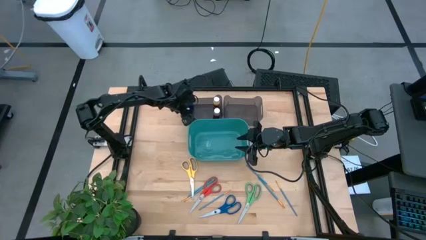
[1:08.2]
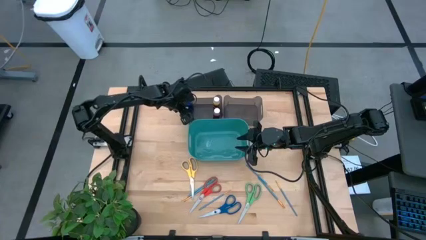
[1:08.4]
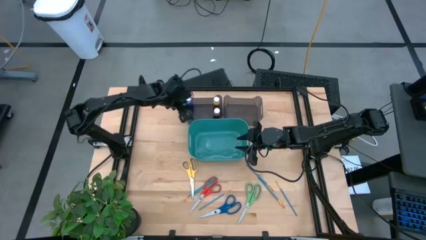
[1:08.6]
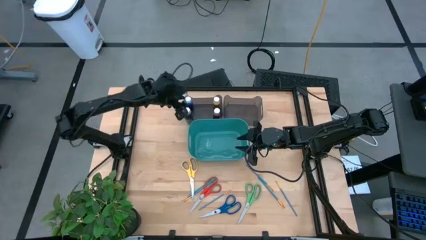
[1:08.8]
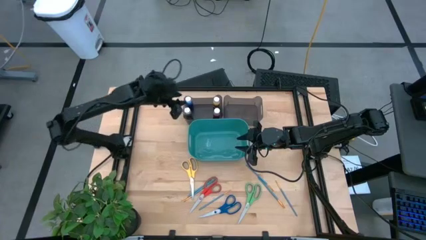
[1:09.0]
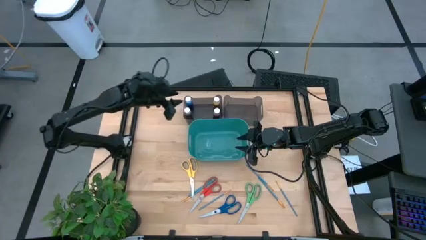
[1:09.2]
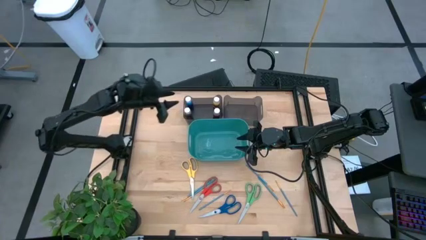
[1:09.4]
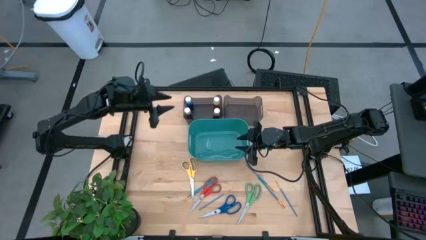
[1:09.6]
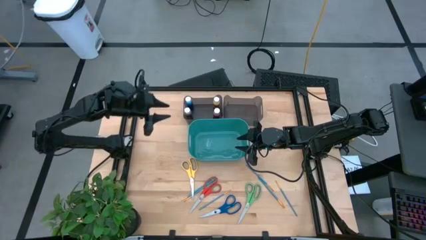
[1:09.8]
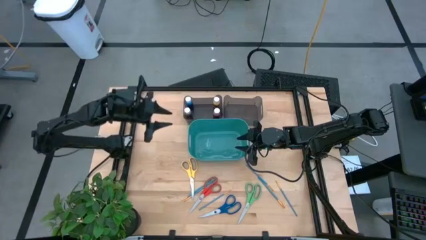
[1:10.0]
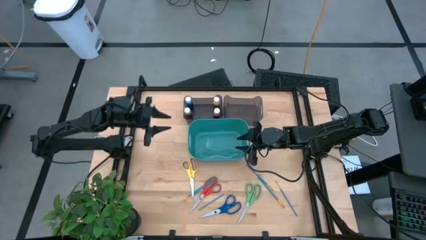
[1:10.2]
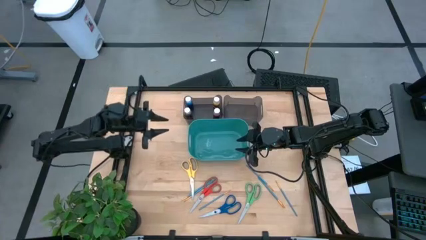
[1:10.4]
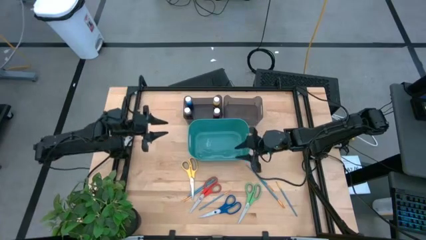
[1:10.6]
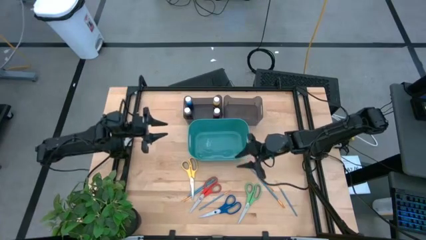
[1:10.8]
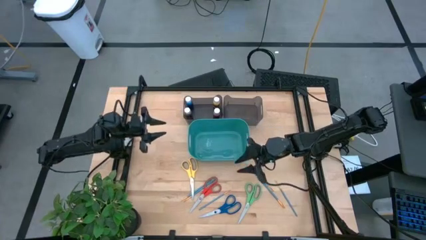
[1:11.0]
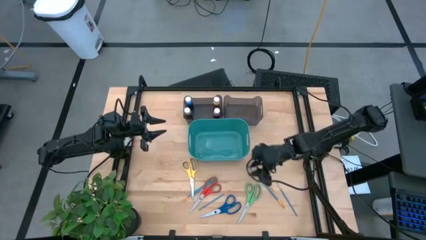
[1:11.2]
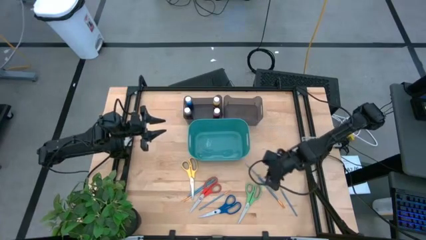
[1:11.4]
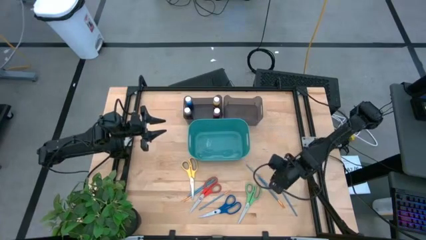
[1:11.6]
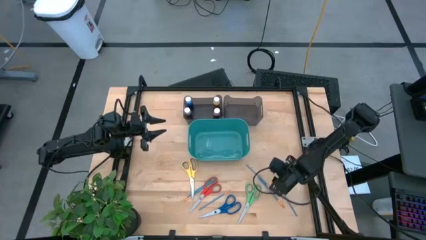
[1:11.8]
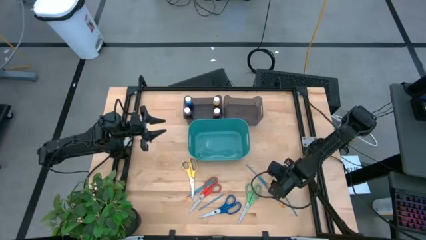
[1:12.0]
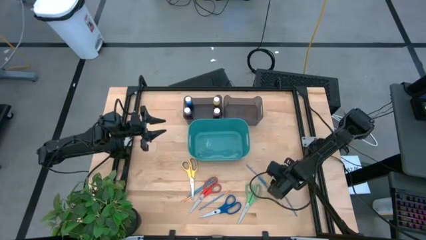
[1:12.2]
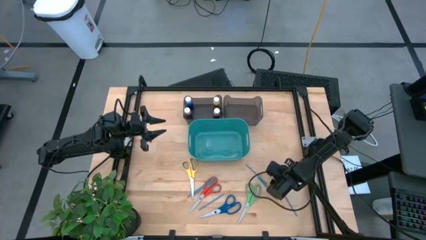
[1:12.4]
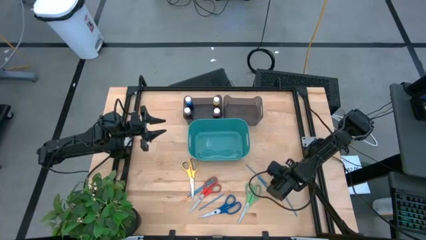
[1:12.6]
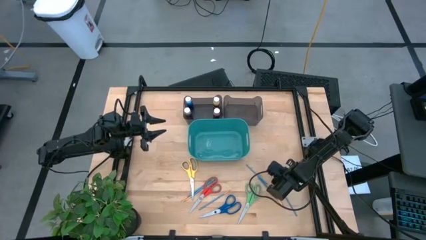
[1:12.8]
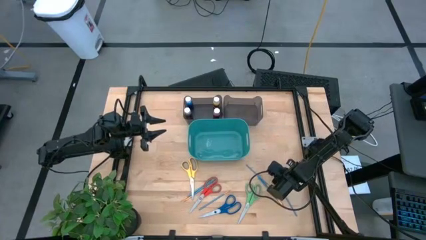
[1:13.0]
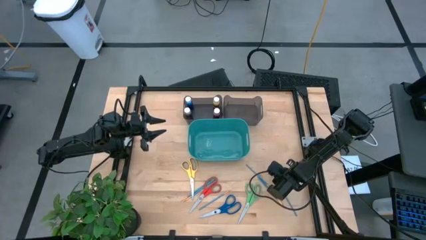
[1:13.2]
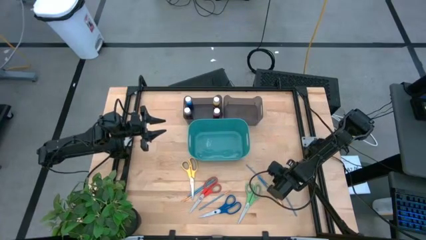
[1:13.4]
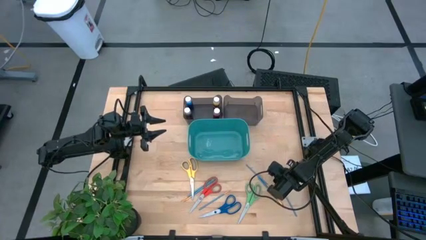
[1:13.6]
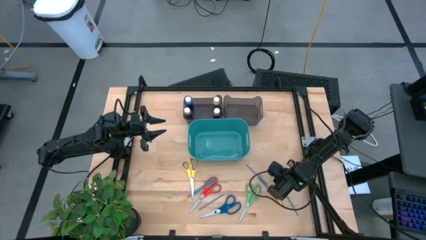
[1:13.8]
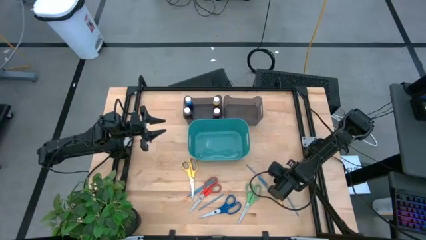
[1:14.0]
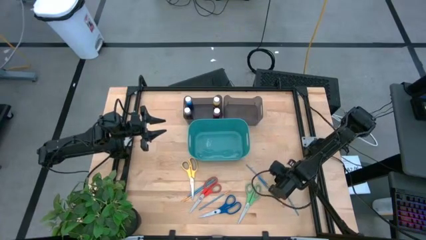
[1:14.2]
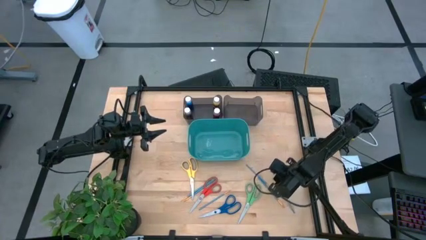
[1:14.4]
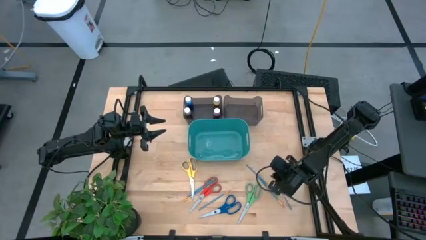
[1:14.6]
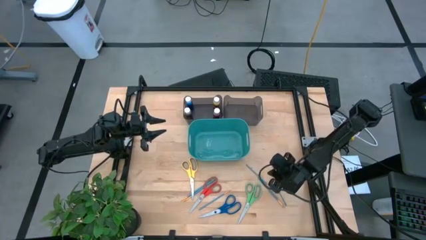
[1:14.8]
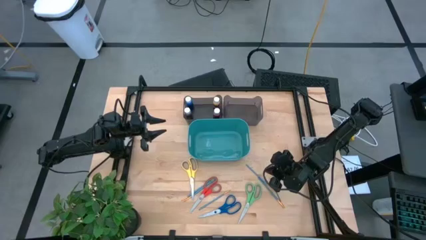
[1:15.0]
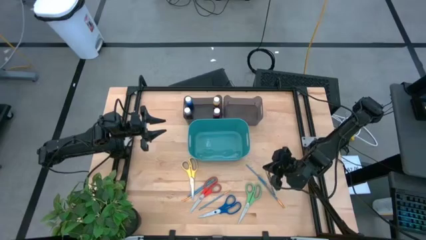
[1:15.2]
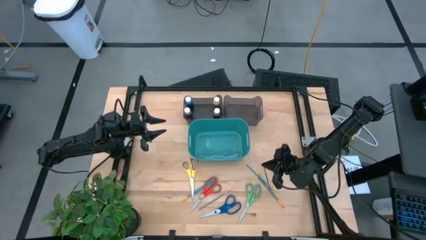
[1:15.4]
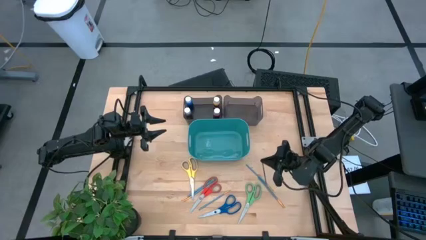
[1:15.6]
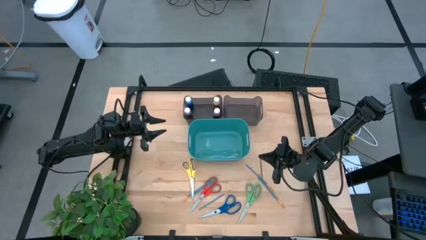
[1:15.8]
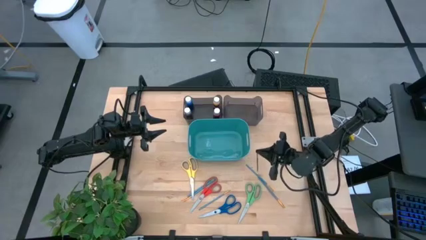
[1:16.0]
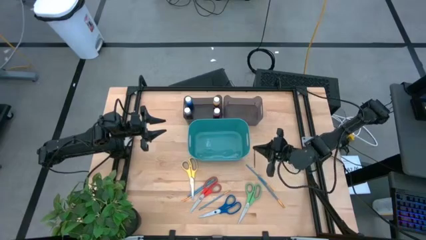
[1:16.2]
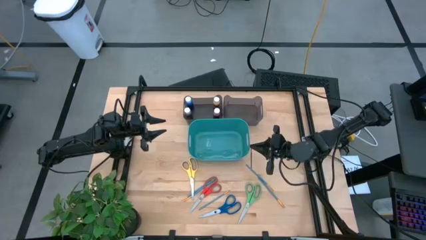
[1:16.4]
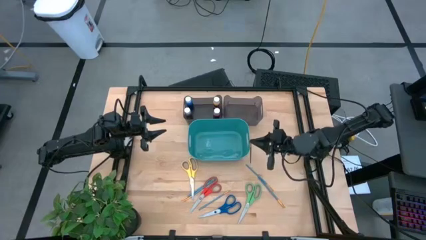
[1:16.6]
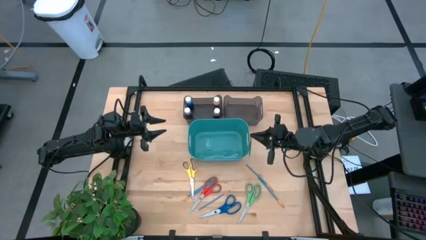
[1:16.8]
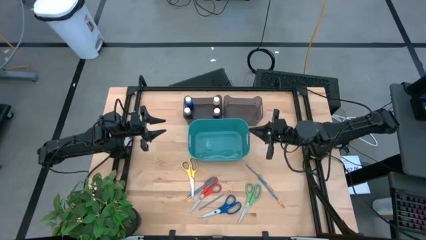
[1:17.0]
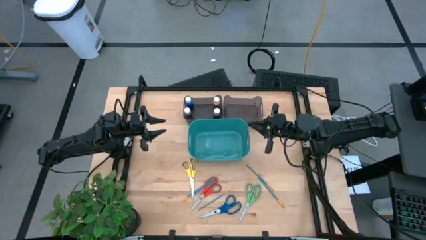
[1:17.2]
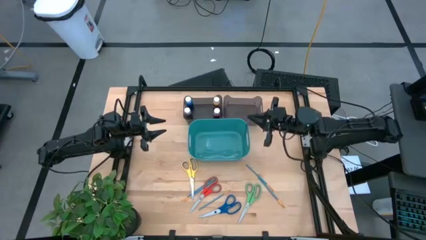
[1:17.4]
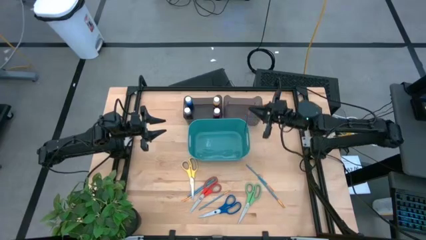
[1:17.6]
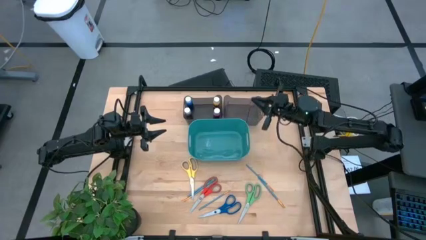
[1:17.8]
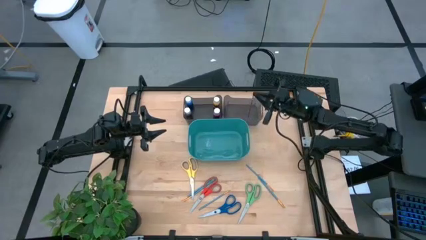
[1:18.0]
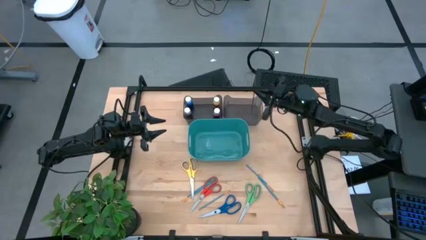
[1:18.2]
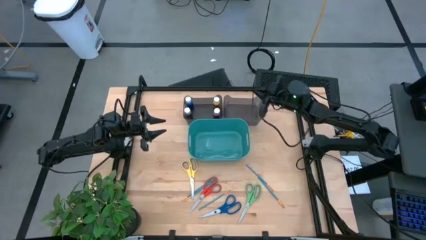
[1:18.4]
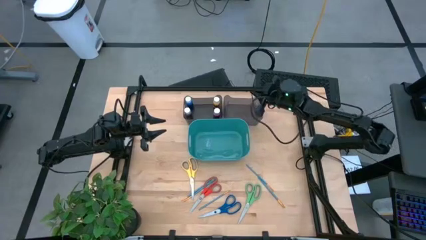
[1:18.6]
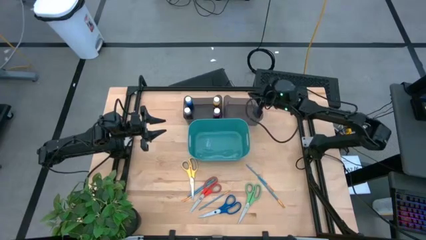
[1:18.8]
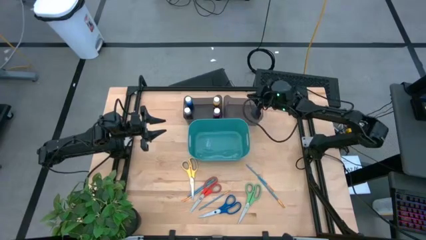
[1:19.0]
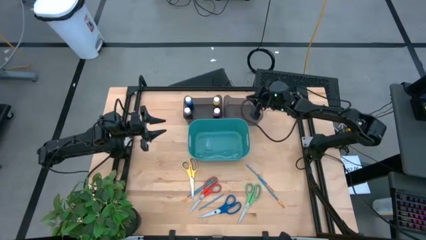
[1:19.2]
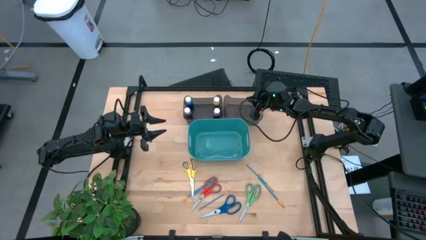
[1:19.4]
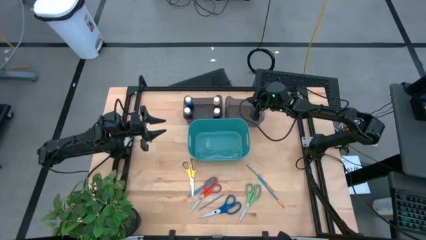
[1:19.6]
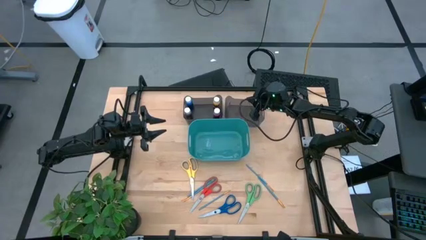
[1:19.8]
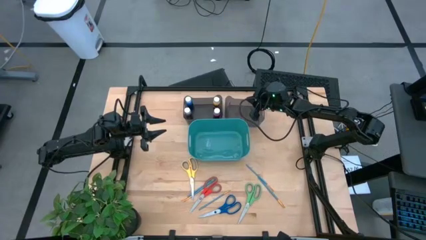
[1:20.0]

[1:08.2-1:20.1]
Task: Pick & Place Paint Supplies
Put the blue paint brush into the right black bin

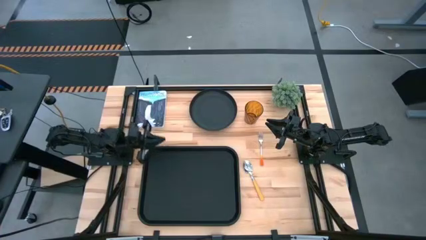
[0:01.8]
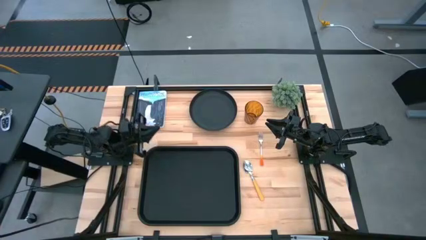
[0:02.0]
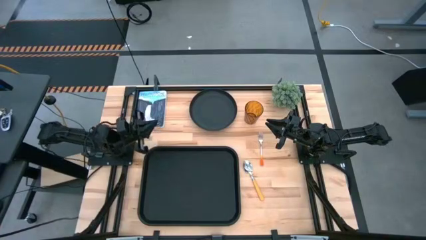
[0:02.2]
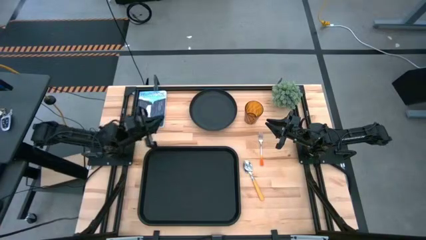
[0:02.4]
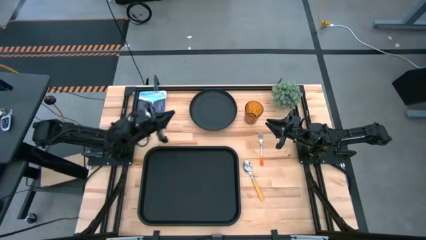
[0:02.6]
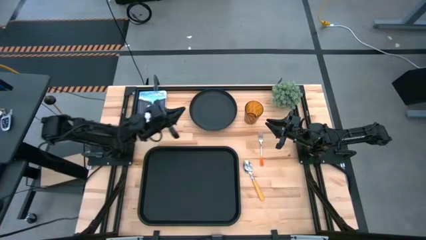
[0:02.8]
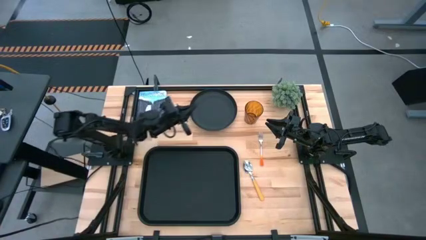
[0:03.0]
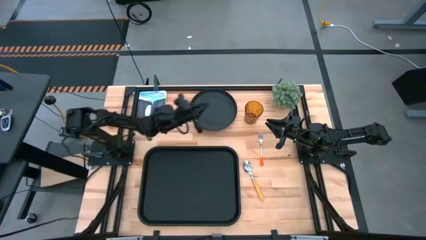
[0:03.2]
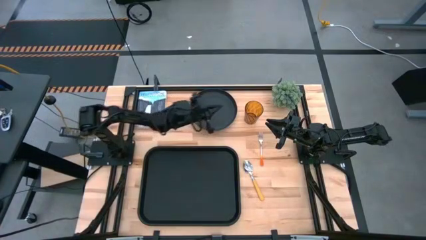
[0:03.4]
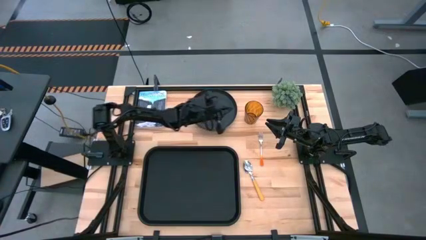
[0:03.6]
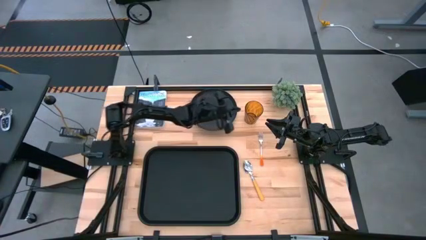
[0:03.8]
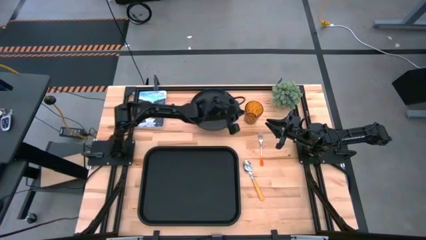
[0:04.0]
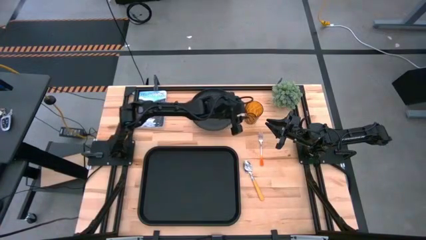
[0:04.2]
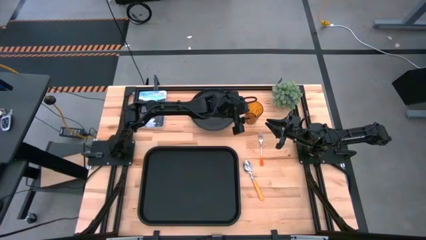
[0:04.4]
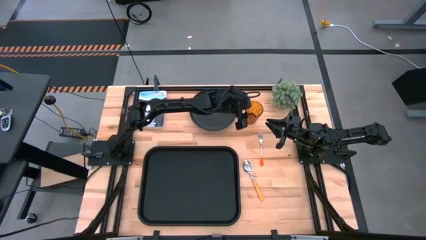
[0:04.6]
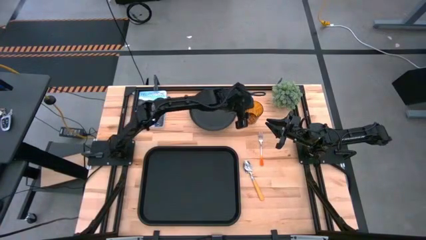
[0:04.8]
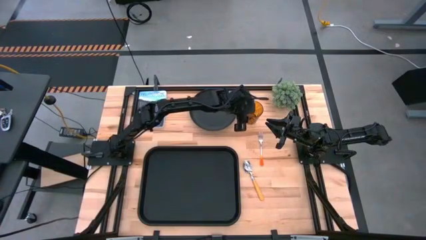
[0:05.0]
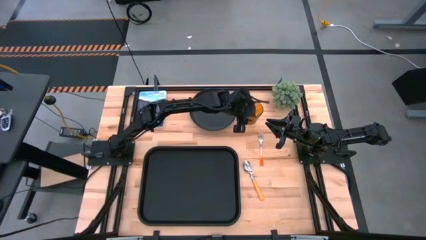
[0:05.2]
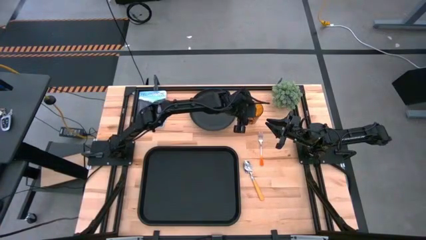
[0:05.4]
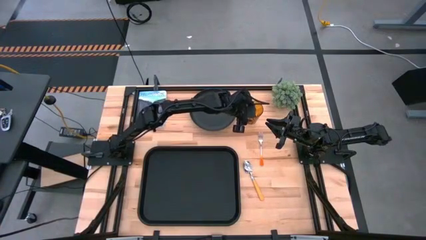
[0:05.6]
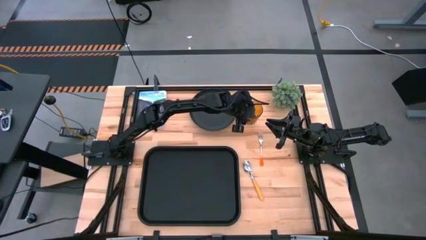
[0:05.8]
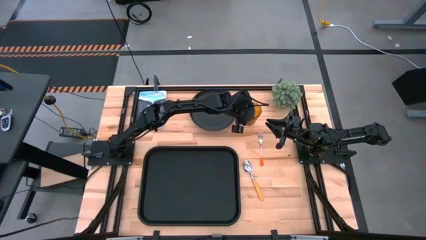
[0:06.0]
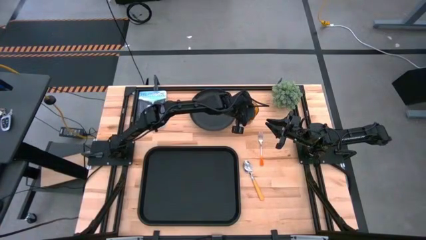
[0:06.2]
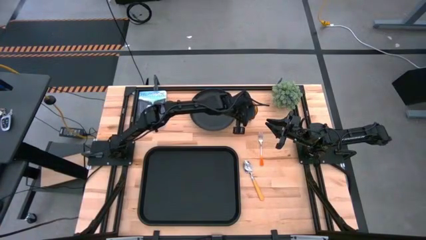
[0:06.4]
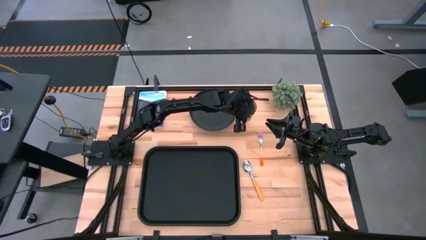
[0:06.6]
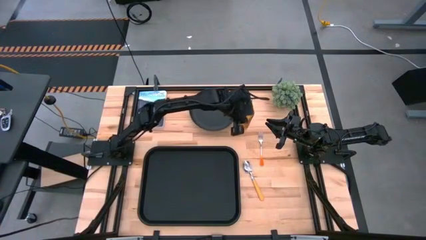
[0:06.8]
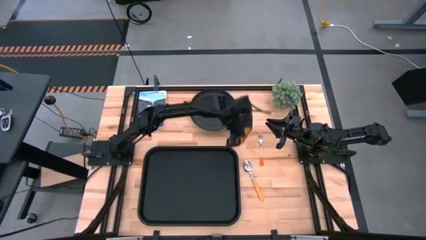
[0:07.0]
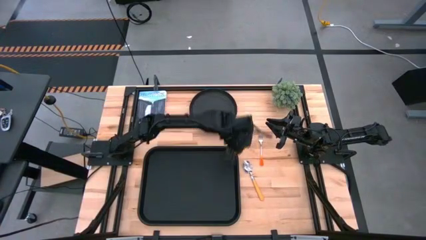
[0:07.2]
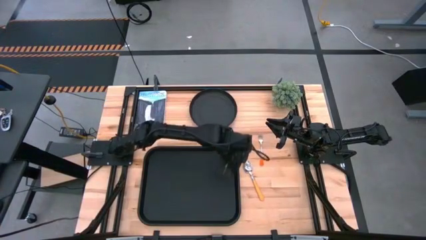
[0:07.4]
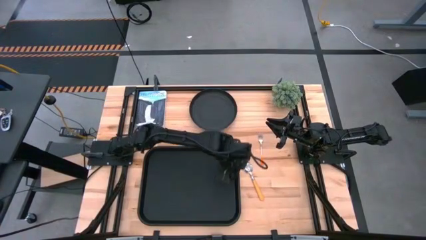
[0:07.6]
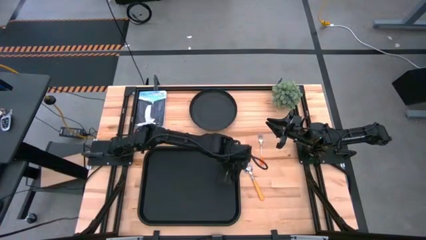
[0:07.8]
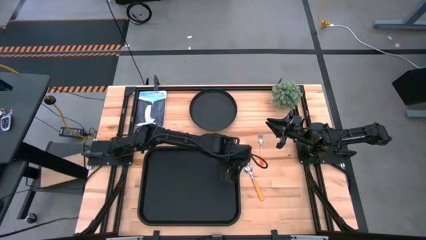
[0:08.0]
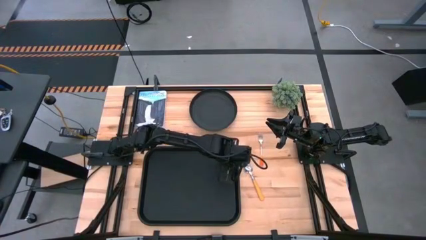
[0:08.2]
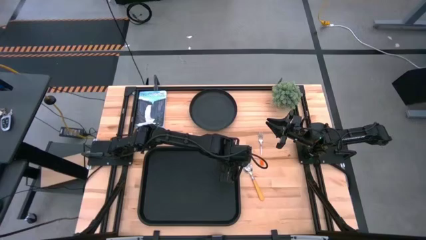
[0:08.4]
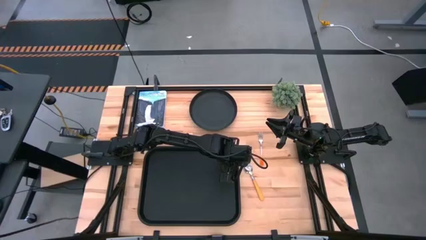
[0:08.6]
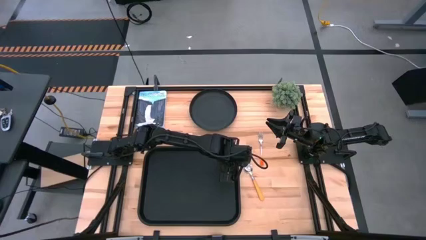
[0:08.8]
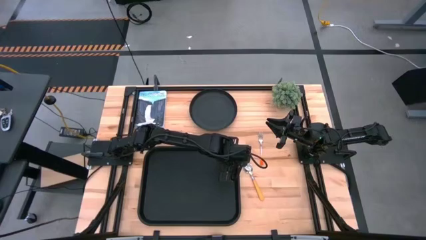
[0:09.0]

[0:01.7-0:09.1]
Task: Pick and place plate/cup/fork/spoon on tray
Put the brown cup on the black tray
